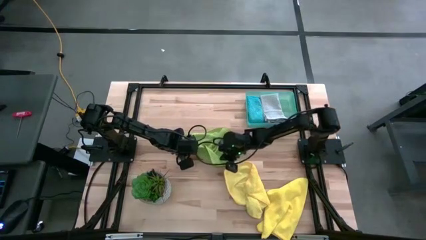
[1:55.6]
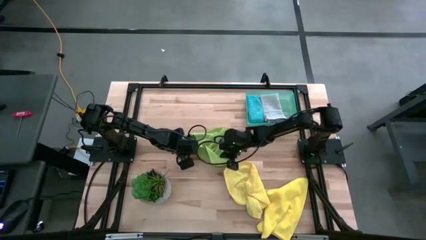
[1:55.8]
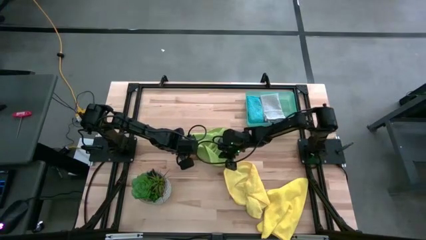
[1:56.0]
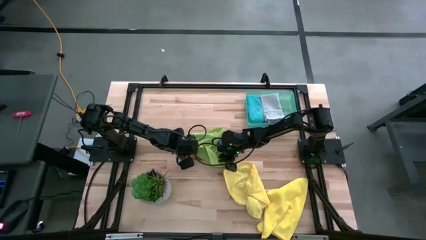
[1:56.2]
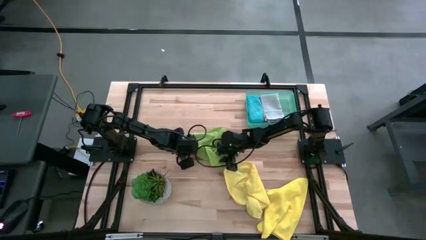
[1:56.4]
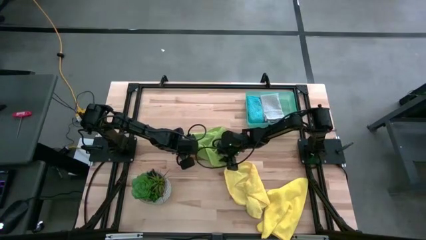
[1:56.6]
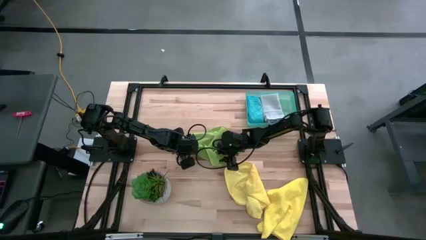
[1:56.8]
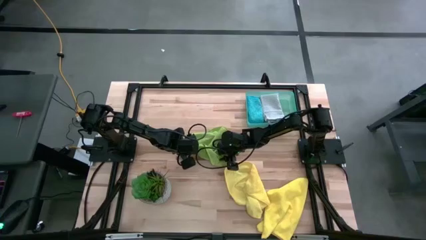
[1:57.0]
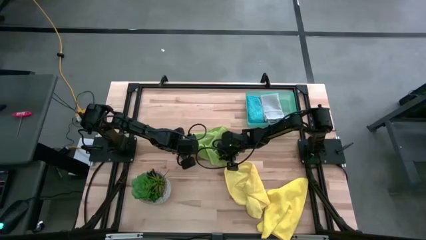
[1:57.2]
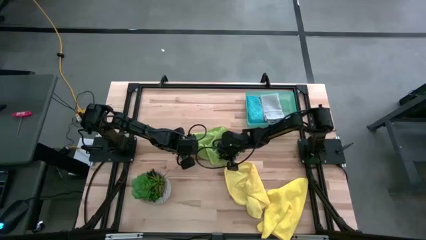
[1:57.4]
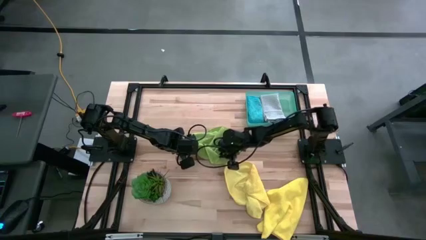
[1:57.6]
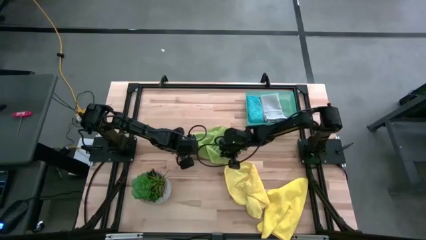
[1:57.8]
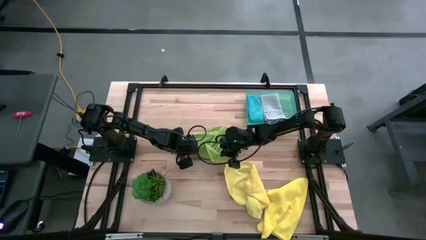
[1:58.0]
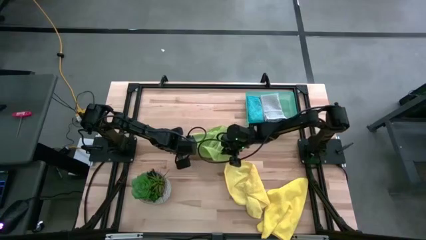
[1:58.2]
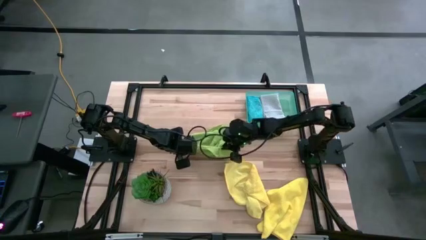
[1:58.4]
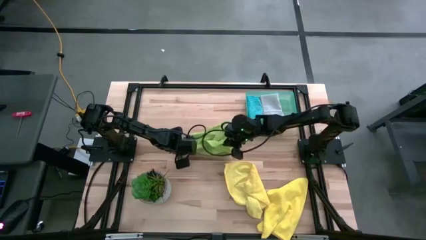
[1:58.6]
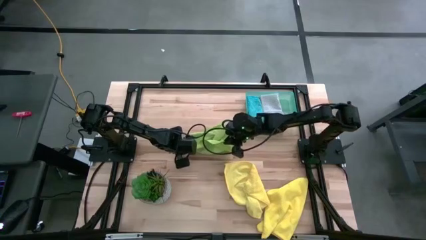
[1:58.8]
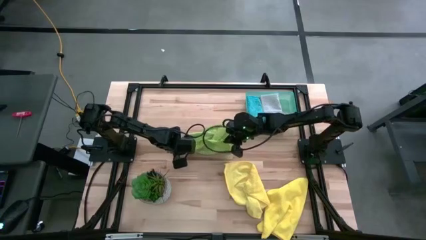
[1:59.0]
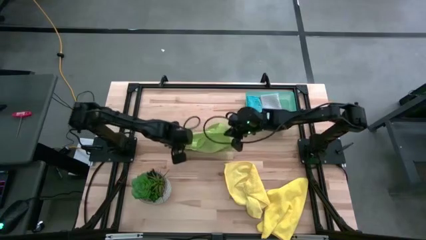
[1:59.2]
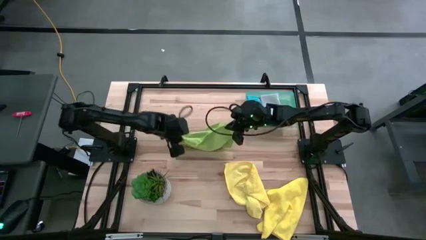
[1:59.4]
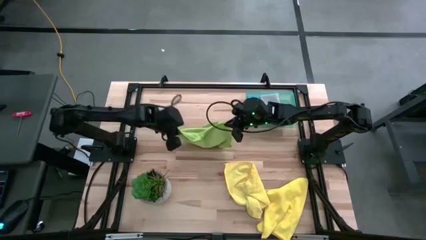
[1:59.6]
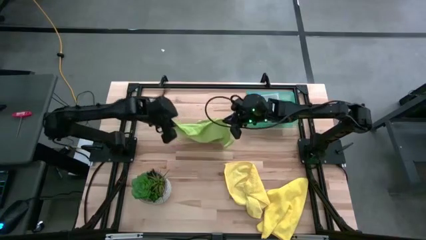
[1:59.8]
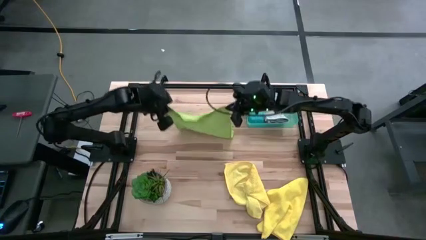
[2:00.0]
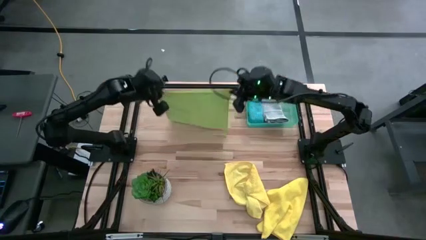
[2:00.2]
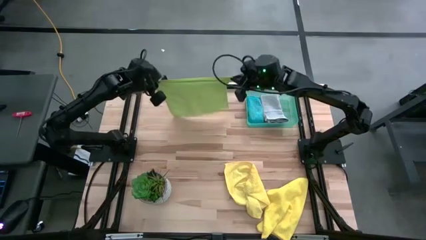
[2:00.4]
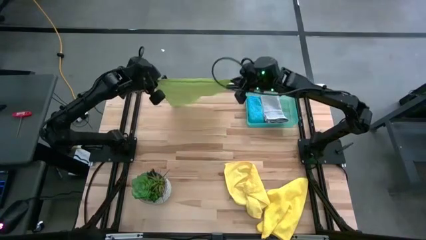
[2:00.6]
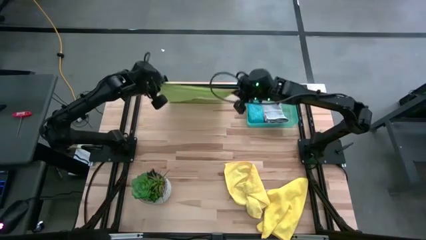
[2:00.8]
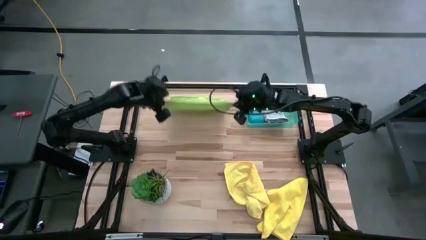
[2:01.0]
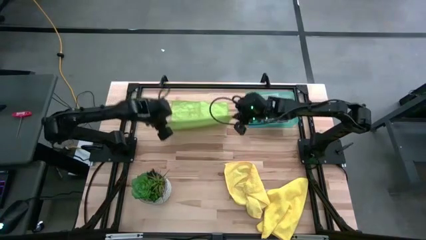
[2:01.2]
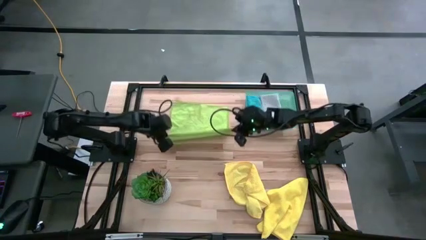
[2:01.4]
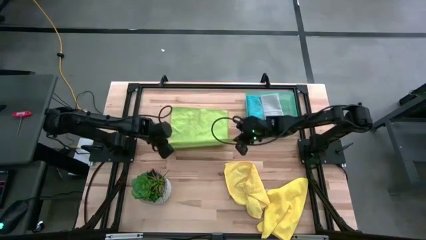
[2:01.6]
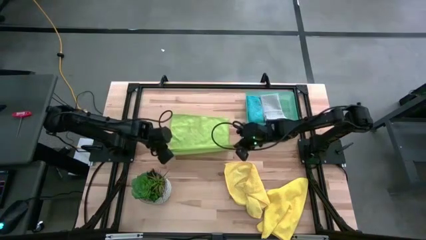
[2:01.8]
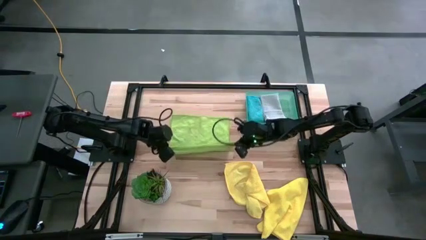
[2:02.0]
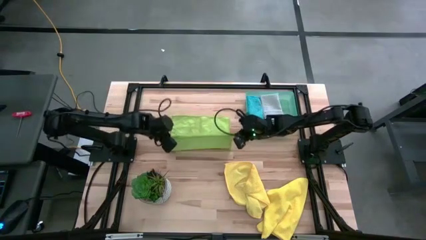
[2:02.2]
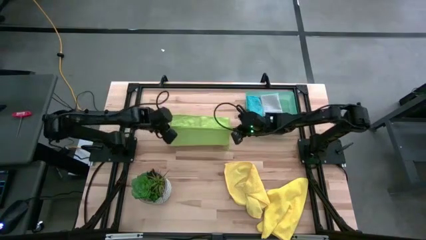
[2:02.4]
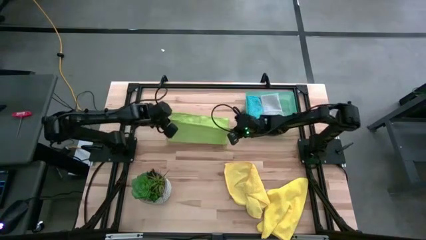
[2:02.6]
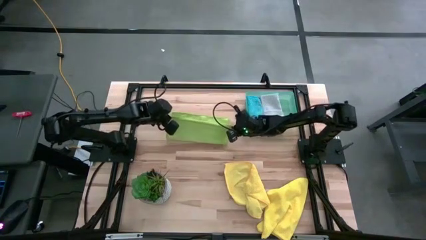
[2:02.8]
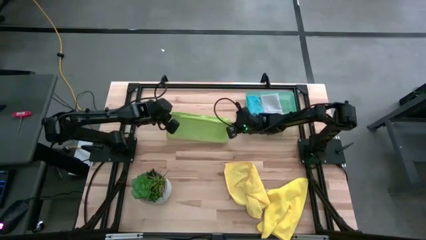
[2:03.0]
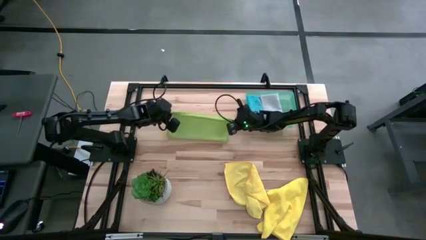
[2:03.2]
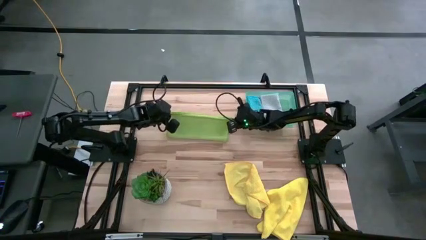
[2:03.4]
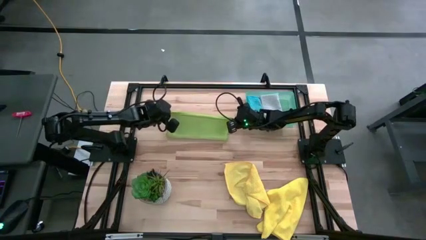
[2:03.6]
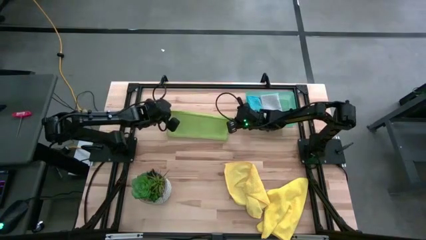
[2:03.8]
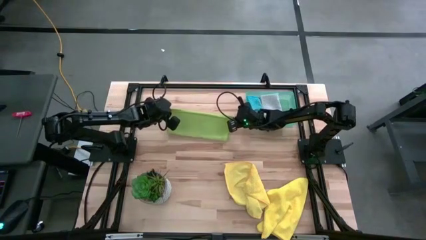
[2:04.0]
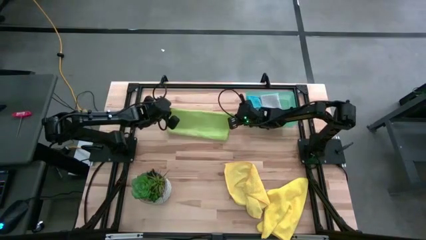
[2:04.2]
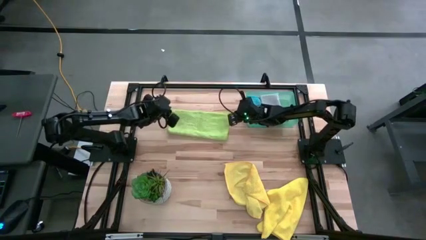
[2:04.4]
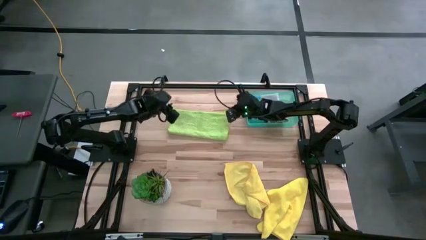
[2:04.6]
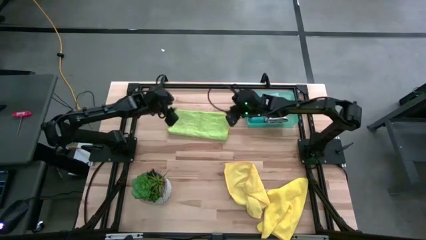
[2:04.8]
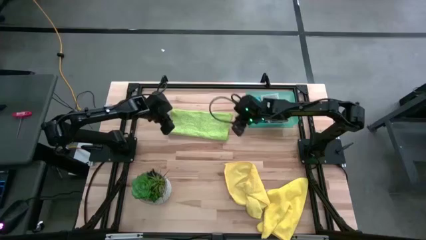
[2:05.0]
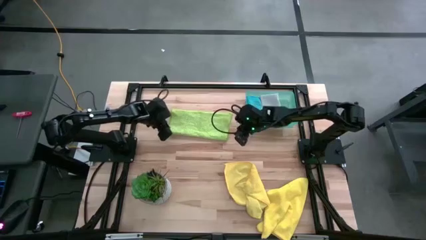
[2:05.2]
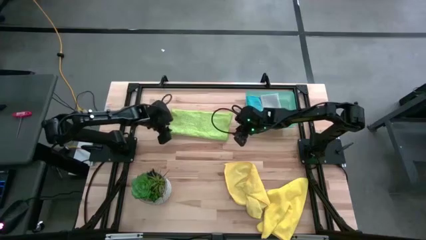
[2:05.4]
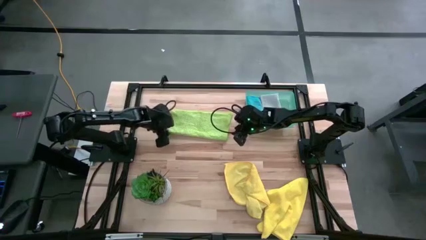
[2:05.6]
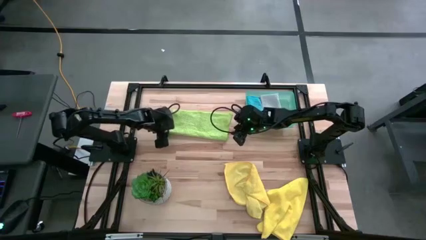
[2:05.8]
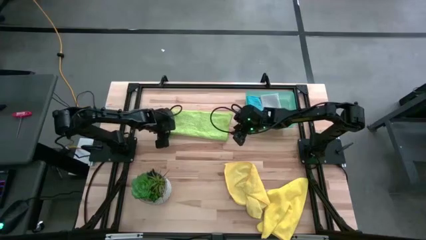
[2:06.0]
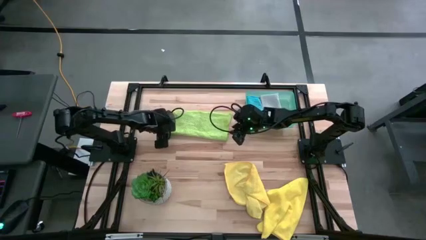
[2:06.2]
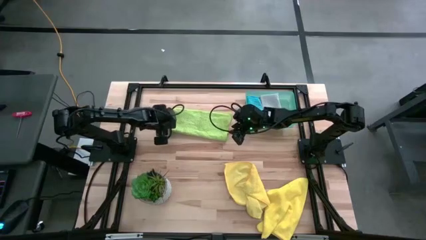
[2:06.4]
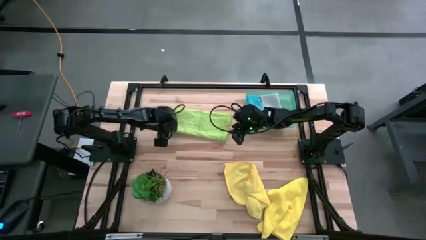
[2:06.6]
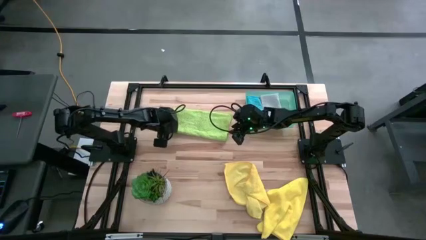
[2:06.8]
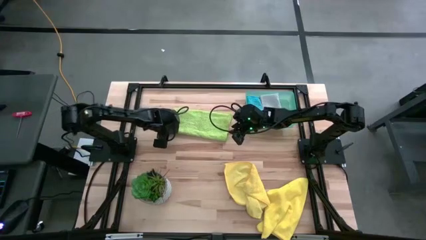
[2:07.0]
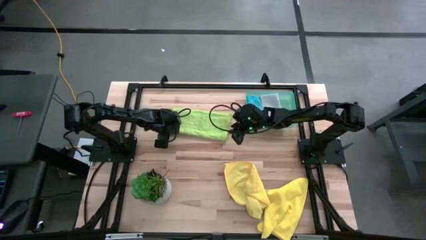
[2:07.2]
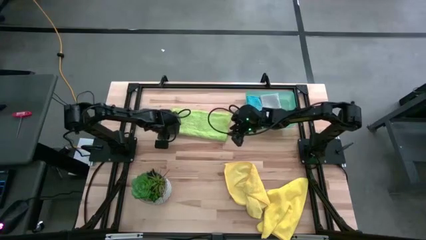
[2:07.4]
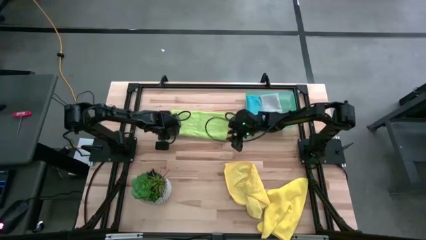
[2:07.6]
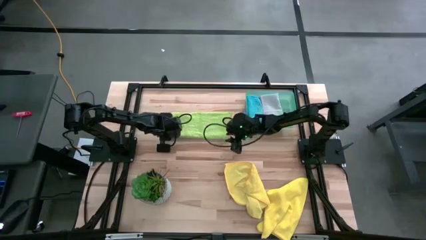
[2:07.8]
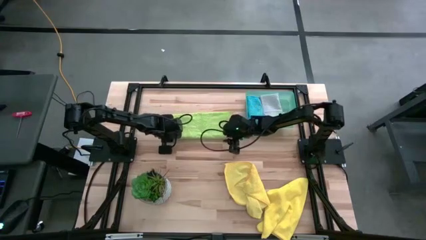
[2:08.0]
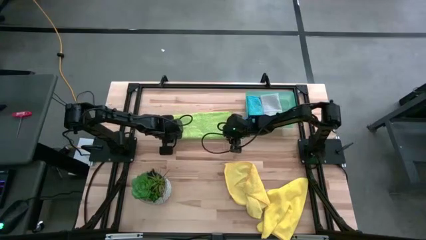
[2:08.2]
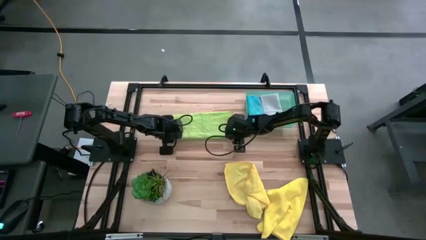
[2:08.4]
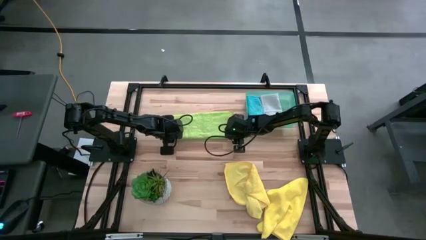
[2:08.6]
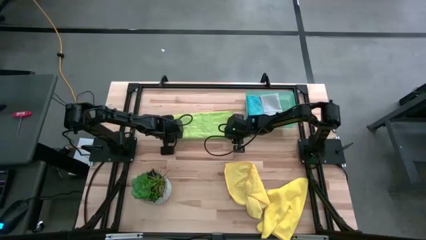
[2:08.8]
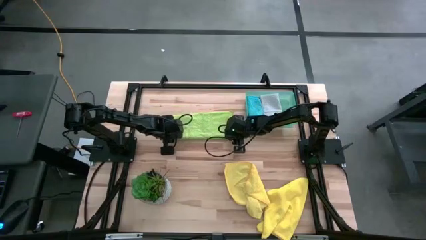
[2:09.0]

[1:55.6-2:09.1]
Task: Fold microfiber towels
Fold the green towel

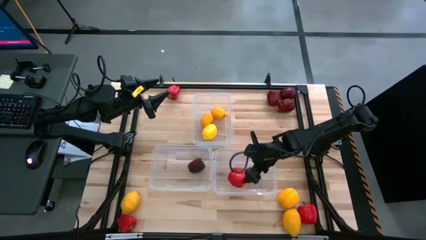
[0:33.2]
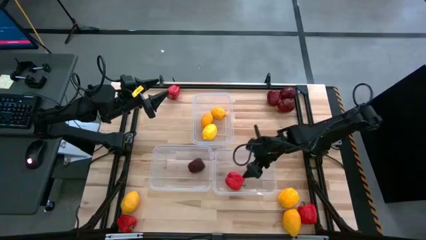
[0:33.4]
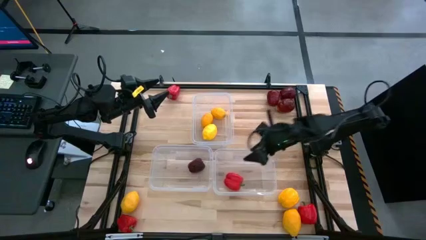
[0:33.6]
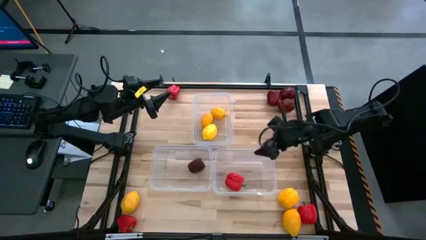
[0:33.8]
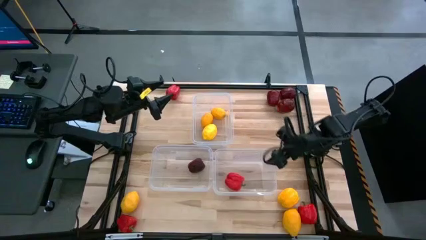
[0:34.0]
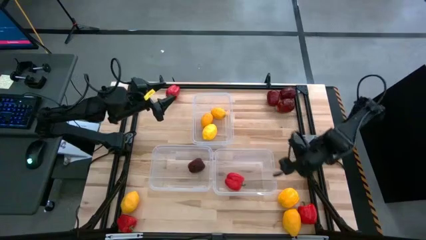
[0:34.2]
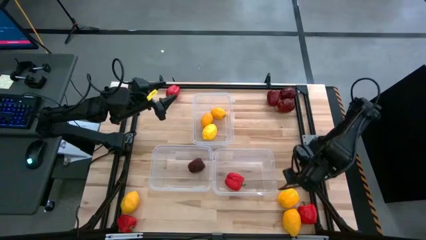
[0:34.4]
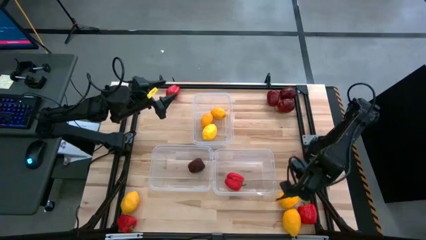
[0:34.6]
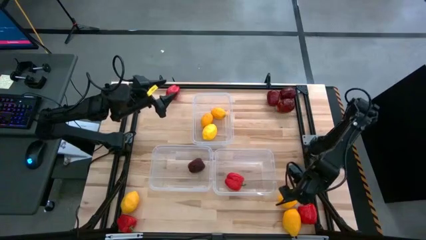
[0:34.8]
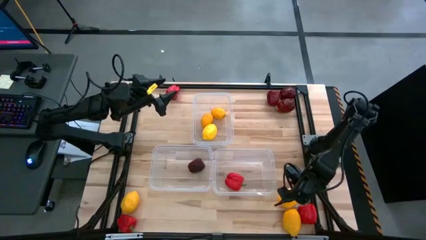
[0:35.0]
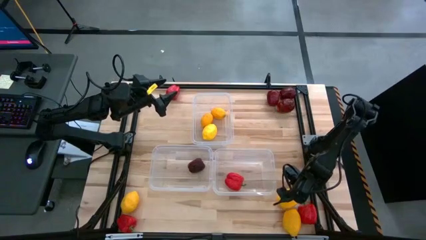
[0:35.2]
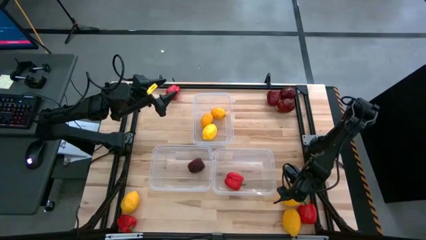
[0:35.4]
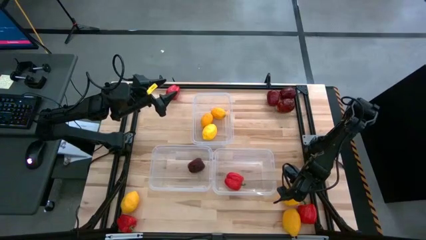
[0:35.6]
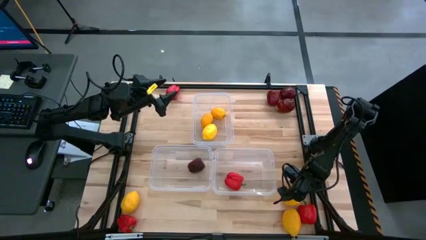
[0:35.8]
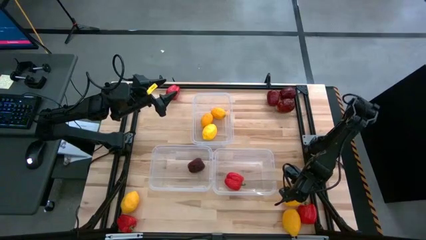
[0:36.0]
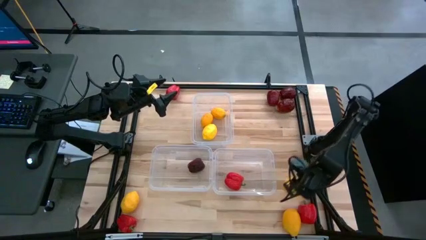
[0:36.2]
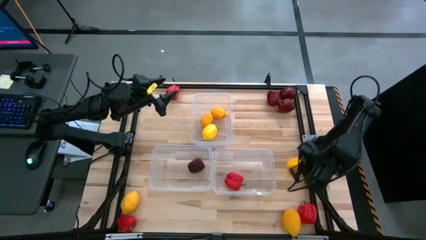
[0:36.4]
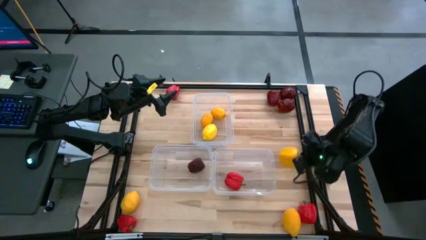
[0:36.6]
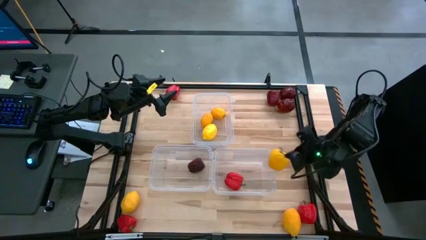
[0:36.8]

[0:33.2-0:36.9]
Task: Sort produce into baskets
Put the yellow bell pepper into the bottom right transparent bin
